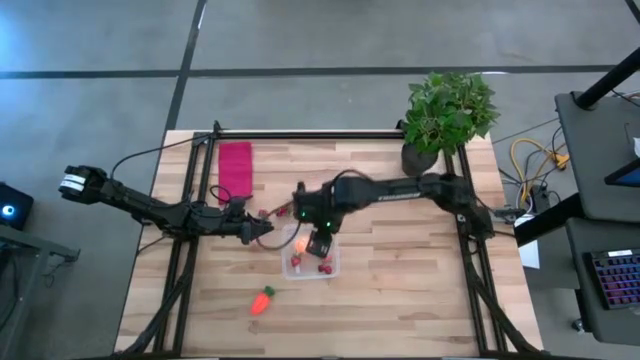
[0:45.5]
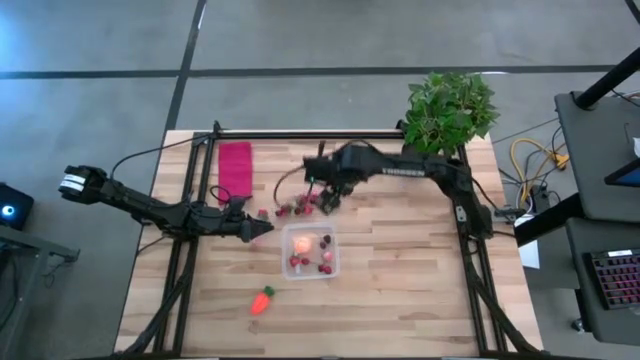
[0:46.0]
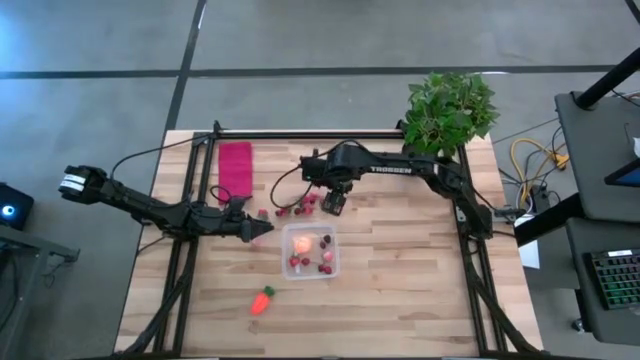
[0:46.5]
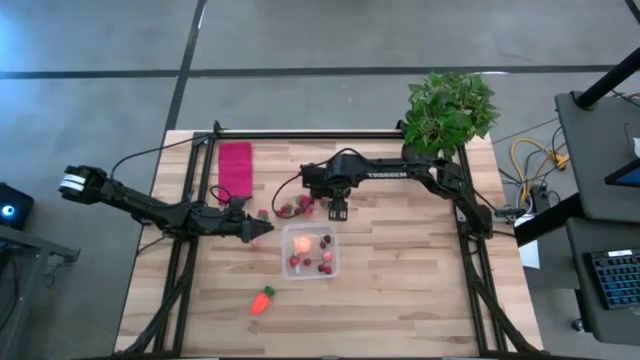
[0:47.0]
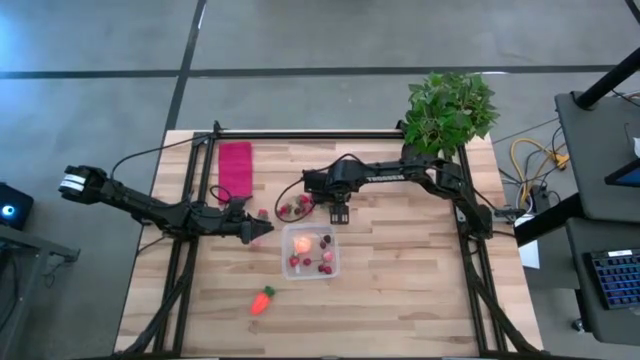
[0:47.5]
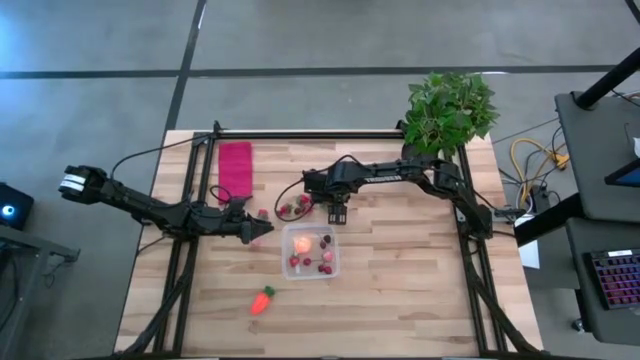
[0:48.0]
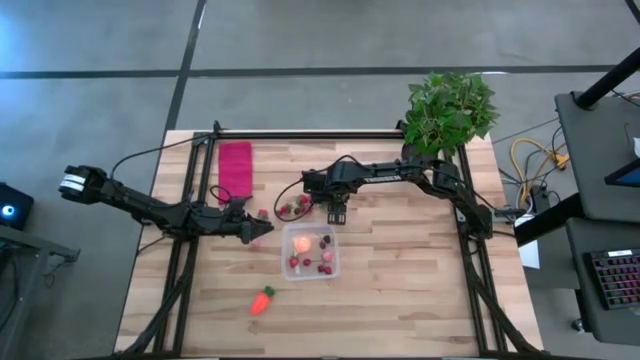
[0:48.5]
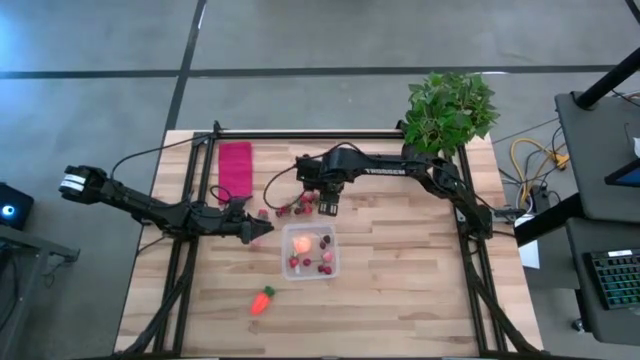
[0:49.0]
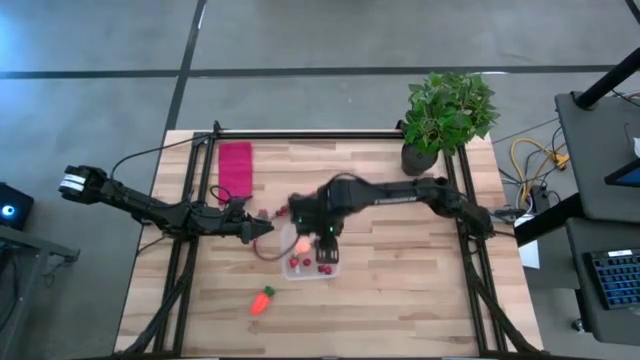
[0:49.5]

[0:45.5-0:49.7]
Task: Pick and placing Produce into tupperware
Put the red strawberry into the transparent bin

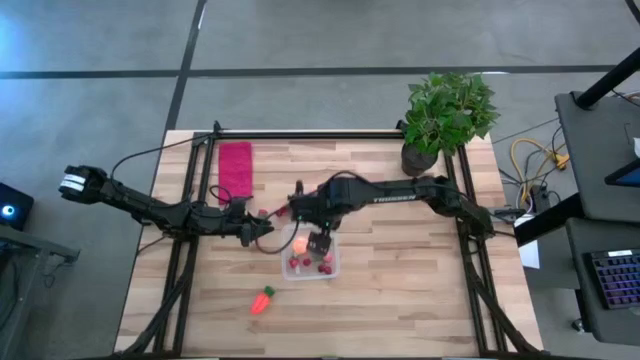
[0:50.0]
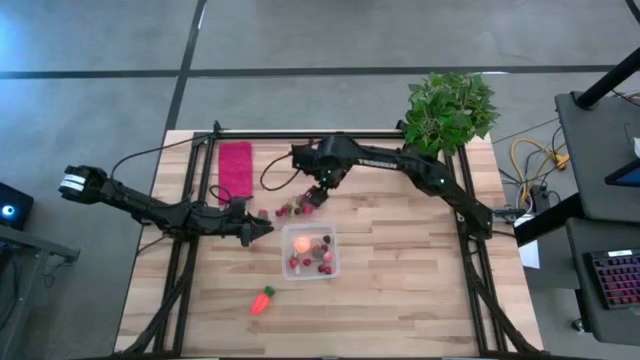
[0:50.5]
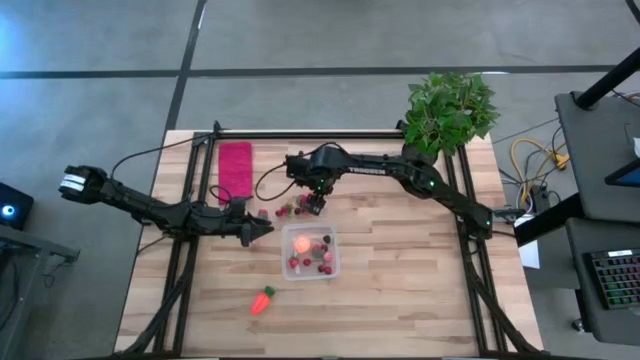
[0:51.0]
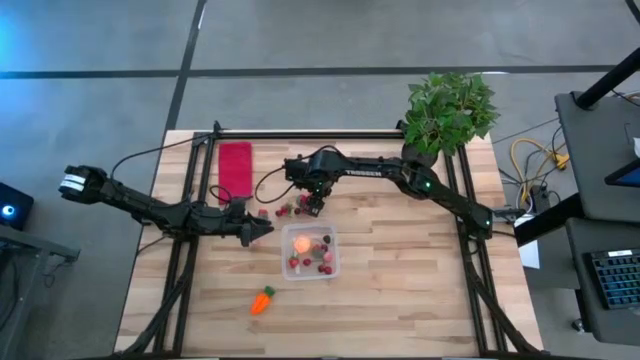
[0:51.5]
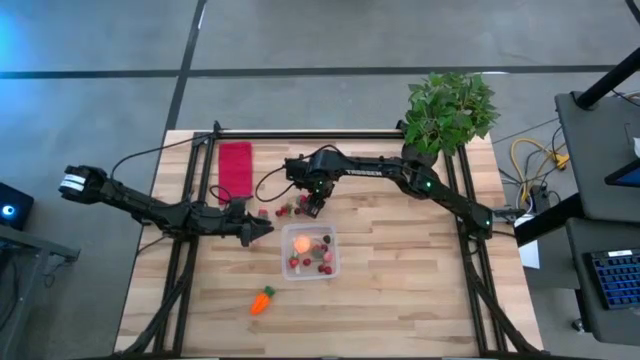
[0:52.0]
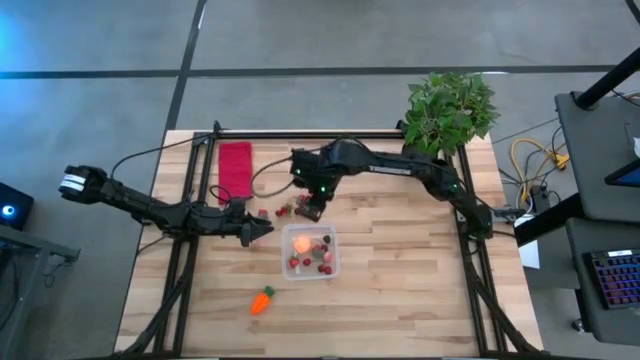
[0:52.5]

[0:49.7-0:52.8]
Put the red strawberry into the transparent bin

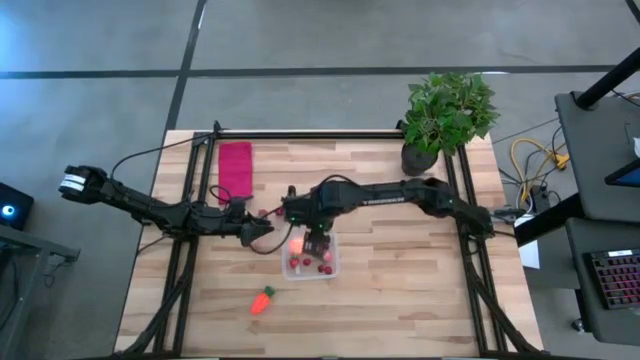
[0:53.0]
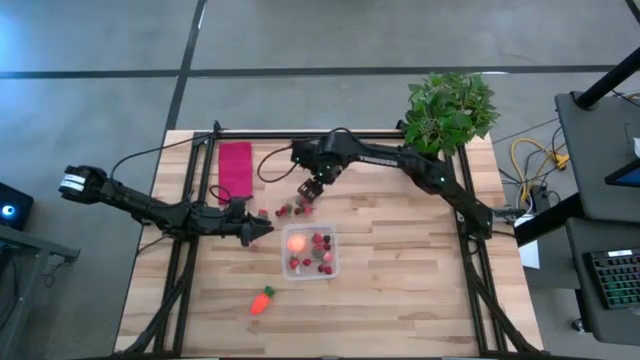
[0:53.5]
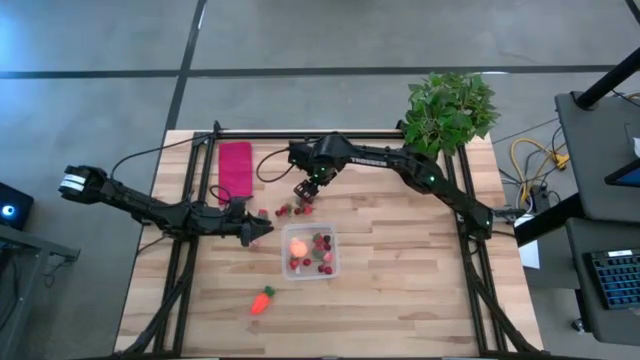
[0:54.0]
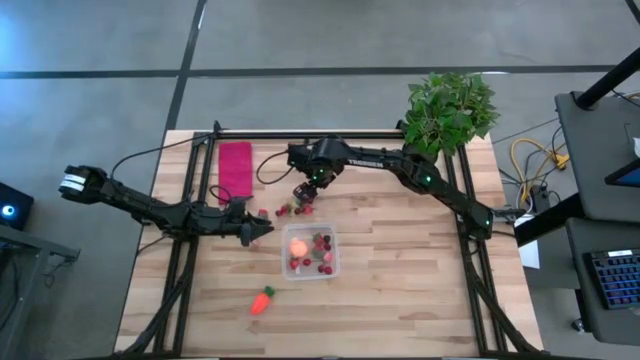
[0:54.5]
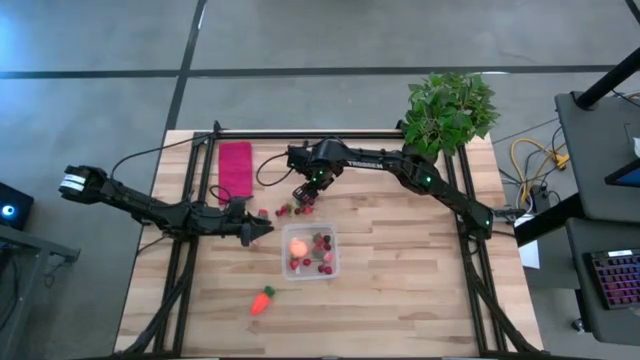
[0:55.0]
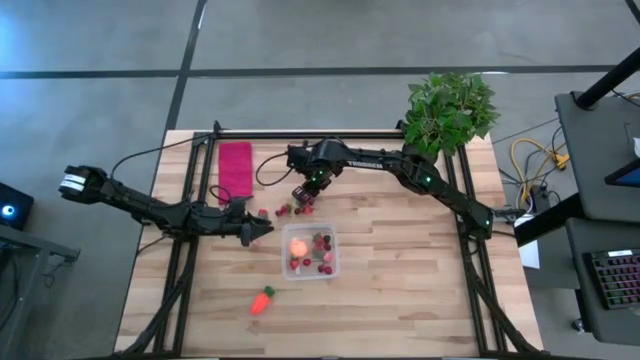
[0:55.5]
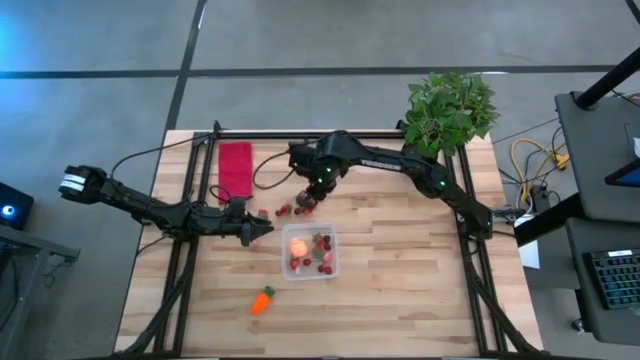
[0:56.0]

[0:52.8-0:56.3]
Put the pink peach into the transparent bin

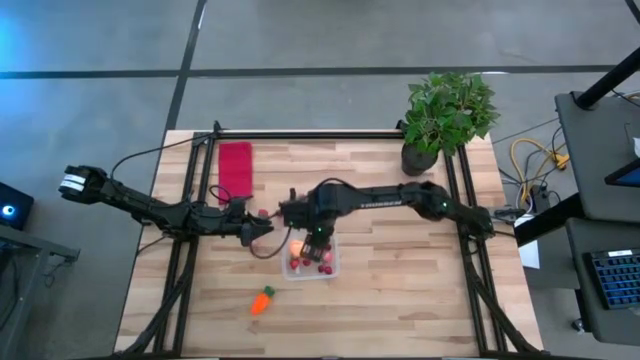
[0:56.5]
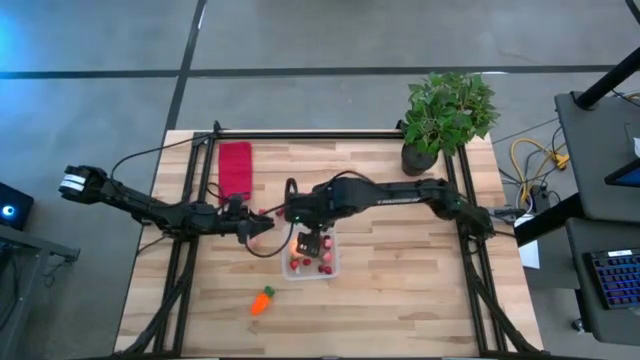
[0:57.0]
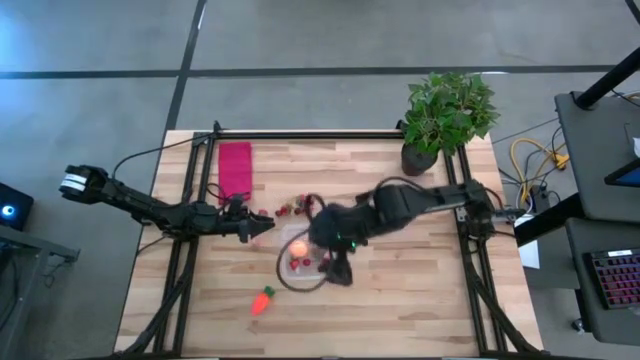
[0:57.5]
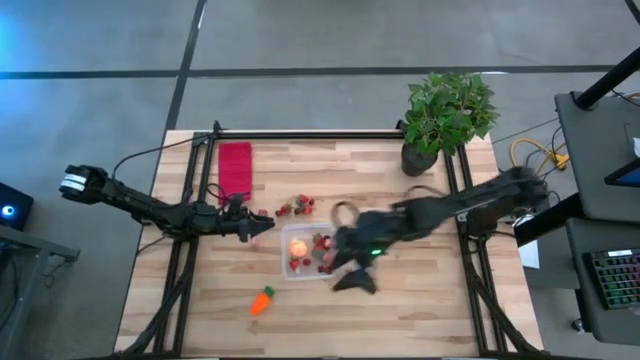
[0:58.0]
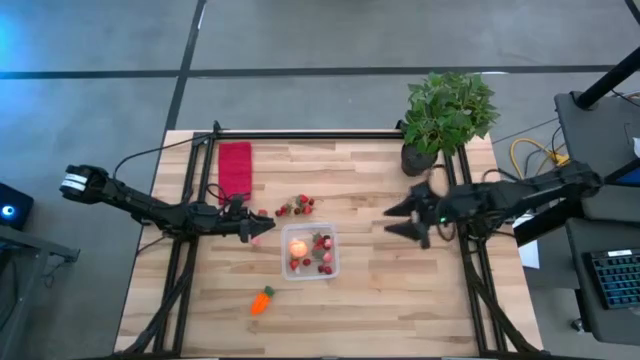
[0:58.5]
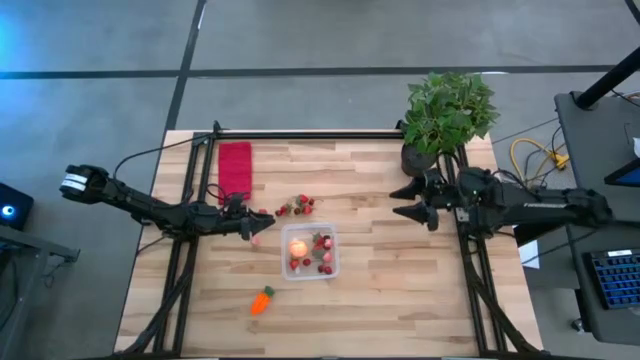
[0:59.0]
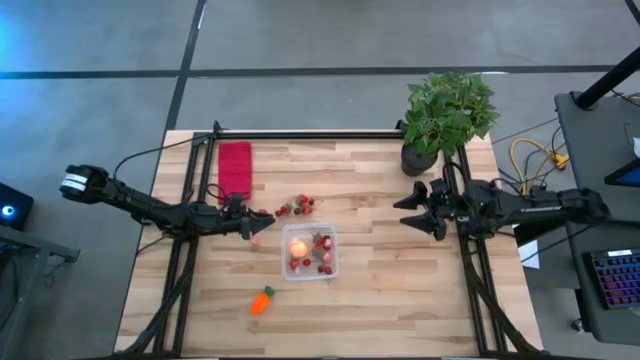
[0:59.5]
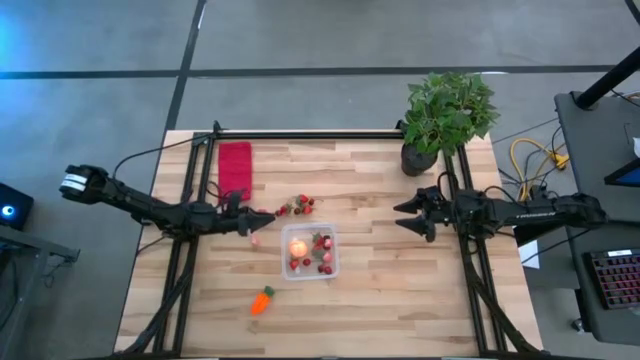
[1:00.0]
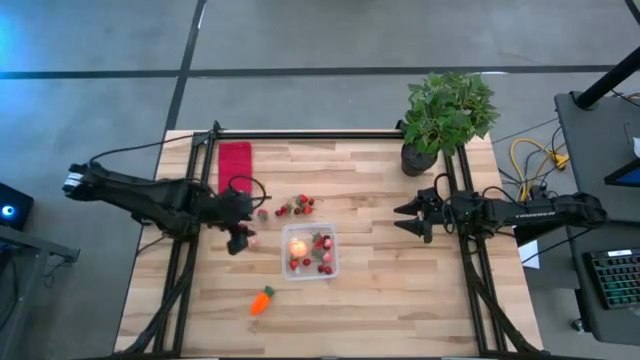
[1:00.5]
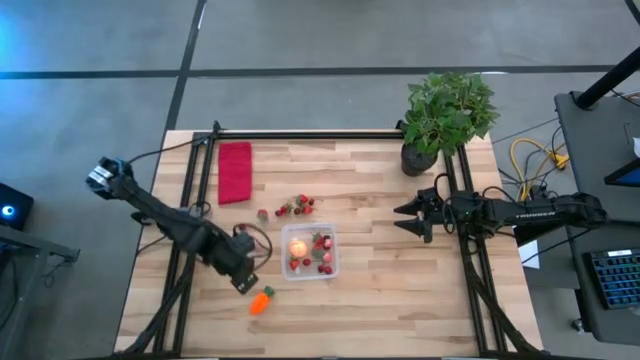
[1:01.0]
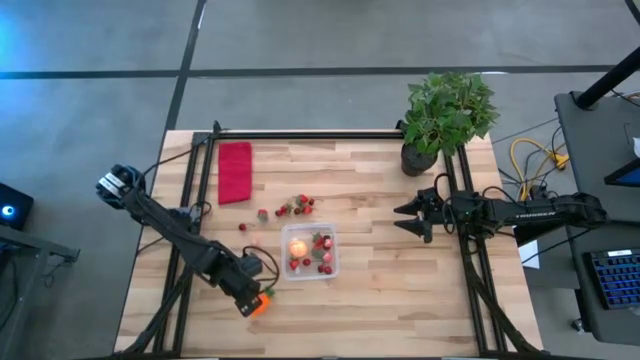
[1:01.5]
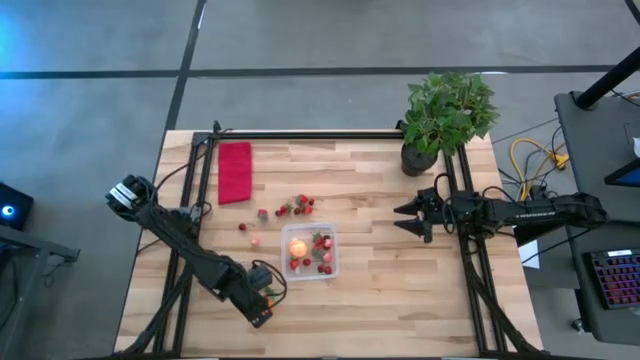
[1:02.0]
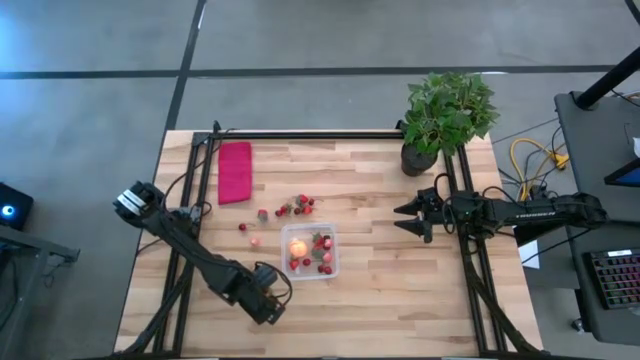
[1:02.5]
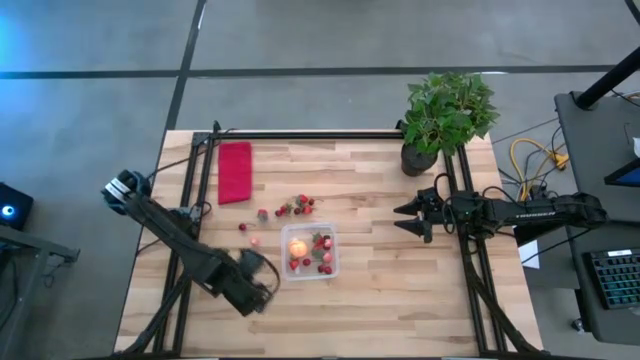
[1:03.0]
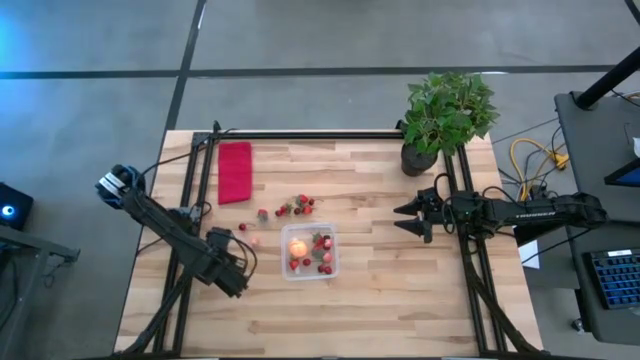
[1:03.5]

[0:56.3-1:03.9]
Put the orange carrot into the transparent bin

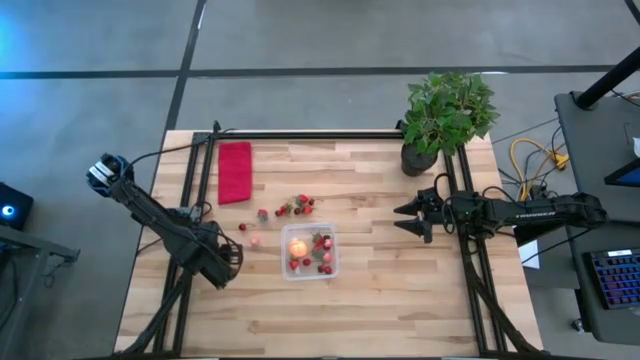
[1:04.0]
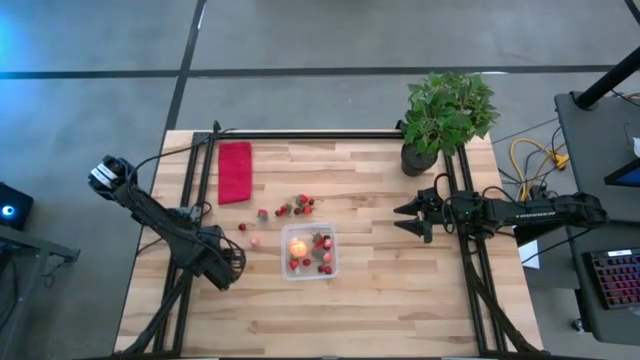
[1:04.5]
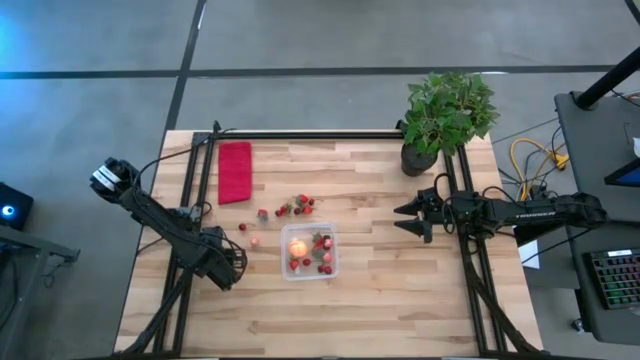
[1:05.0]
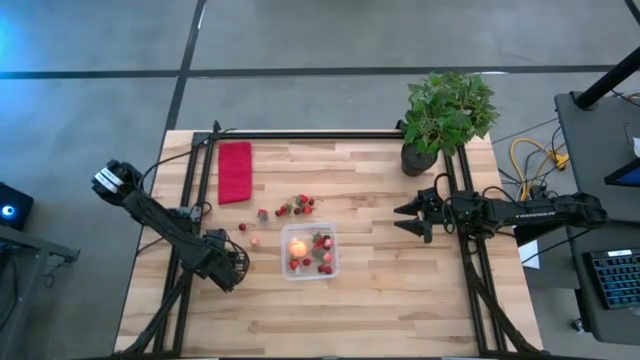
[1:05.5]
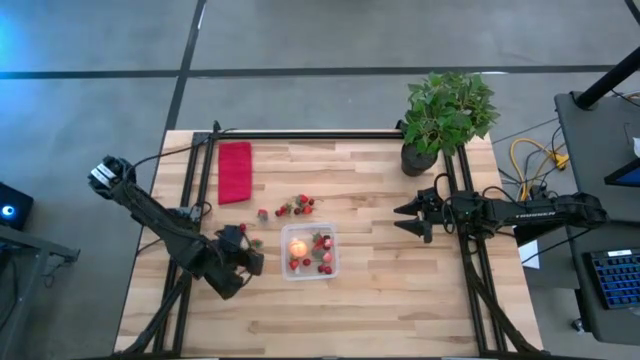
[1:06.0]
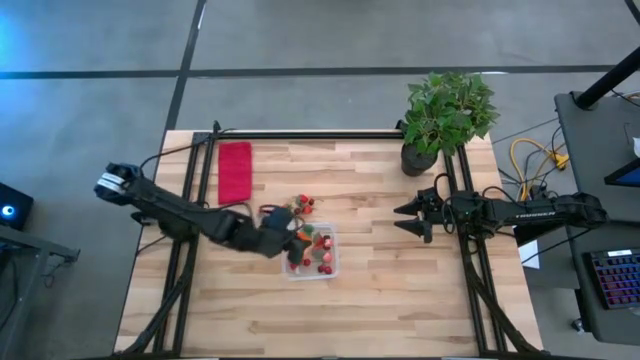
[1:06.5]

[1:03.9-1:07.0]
Put the orange carrot into the transparent bin
